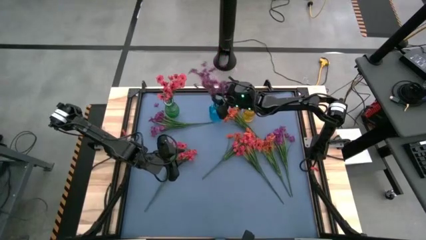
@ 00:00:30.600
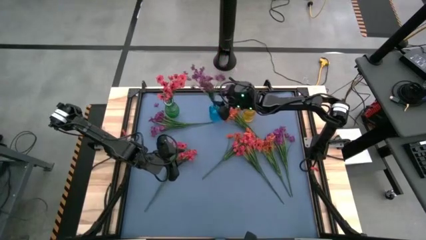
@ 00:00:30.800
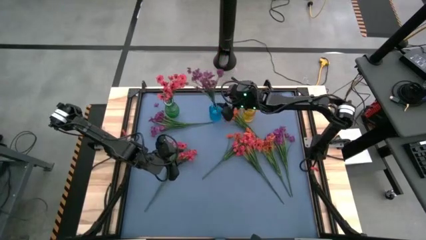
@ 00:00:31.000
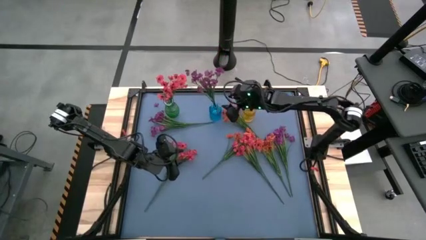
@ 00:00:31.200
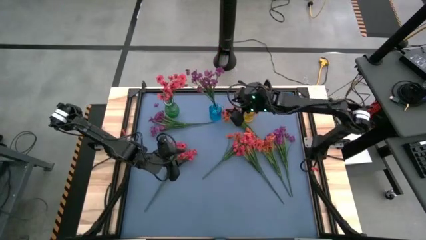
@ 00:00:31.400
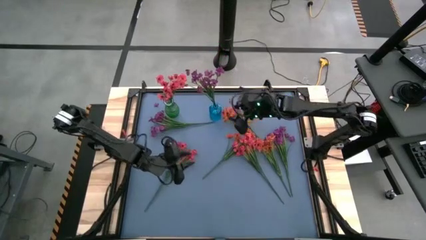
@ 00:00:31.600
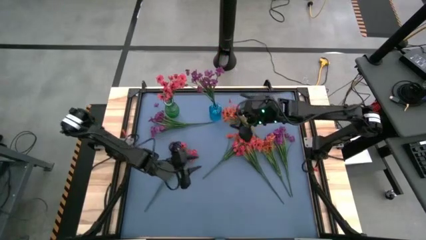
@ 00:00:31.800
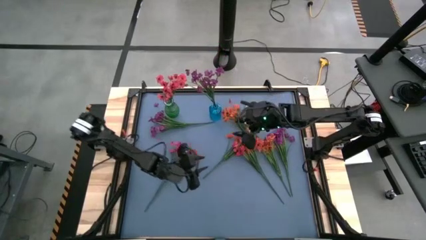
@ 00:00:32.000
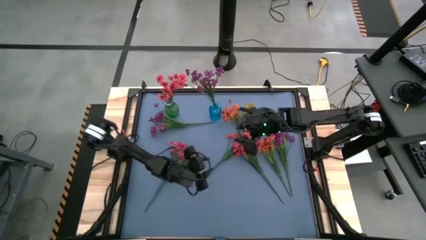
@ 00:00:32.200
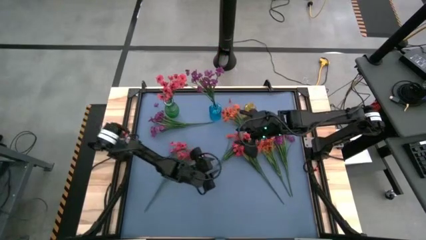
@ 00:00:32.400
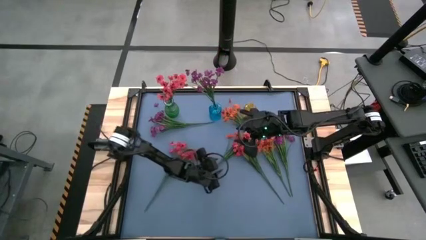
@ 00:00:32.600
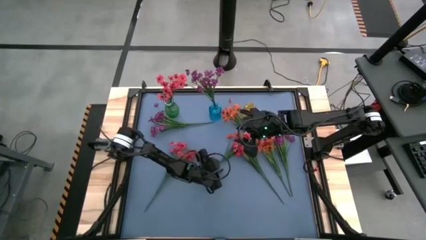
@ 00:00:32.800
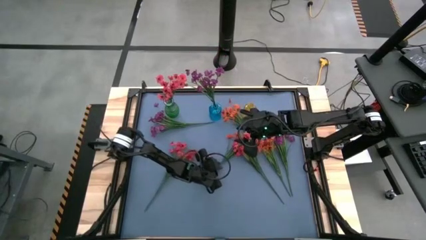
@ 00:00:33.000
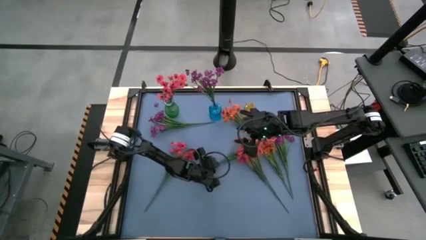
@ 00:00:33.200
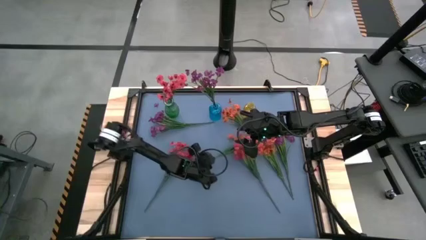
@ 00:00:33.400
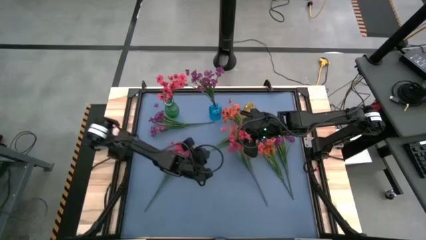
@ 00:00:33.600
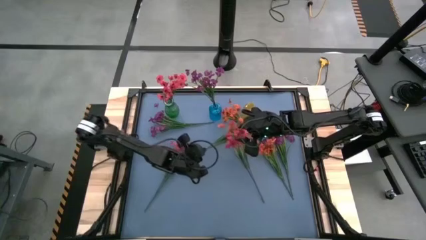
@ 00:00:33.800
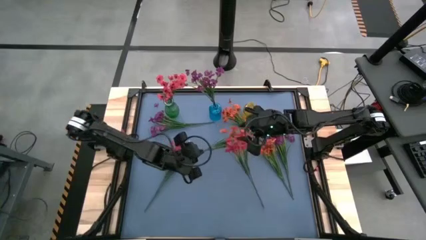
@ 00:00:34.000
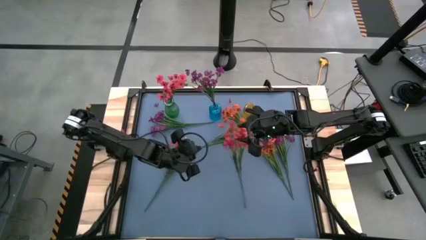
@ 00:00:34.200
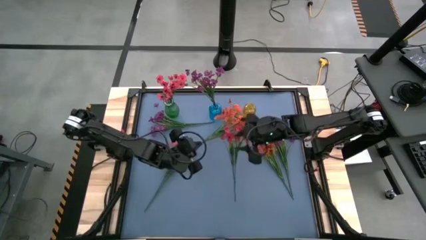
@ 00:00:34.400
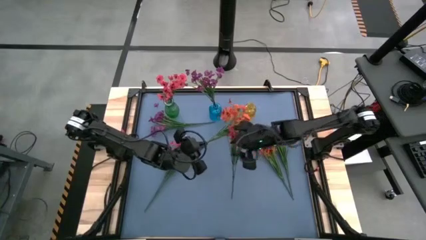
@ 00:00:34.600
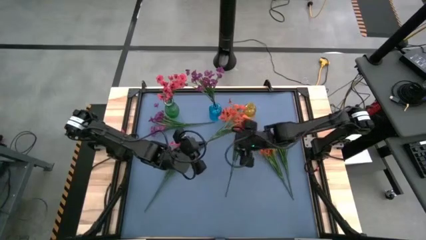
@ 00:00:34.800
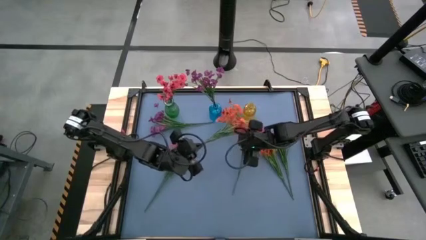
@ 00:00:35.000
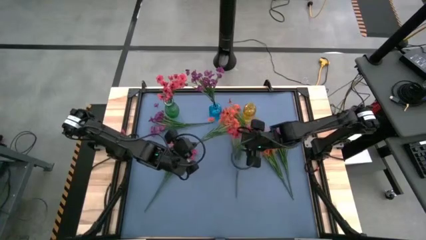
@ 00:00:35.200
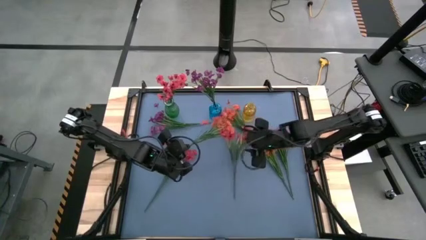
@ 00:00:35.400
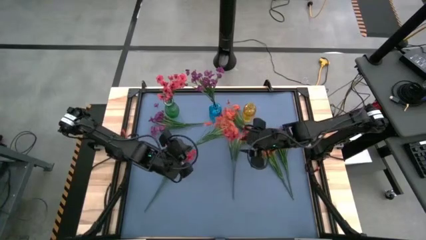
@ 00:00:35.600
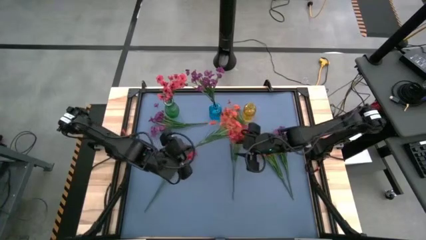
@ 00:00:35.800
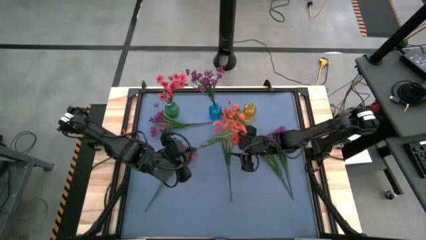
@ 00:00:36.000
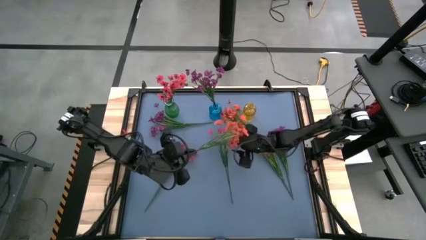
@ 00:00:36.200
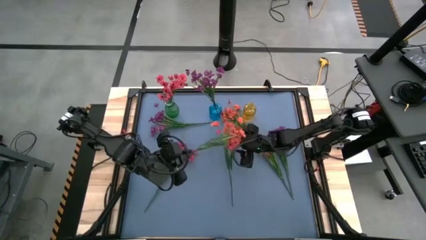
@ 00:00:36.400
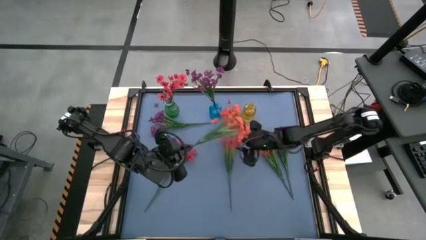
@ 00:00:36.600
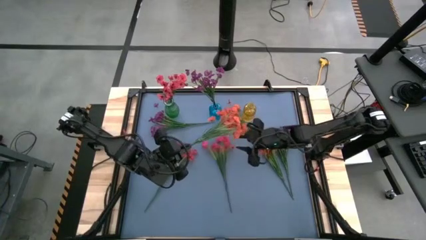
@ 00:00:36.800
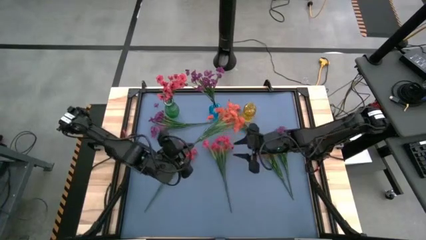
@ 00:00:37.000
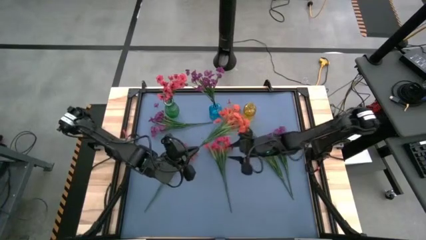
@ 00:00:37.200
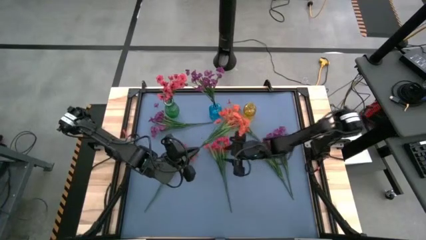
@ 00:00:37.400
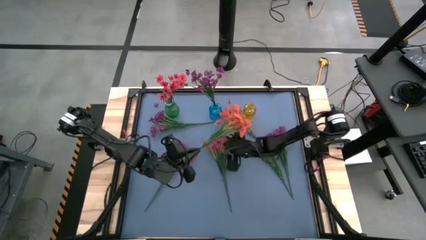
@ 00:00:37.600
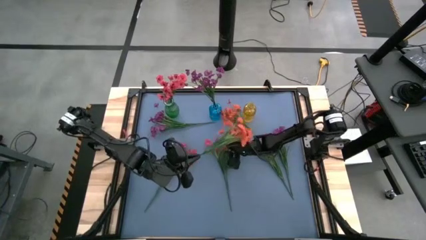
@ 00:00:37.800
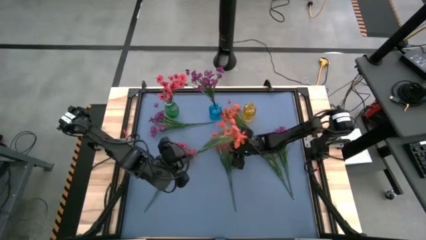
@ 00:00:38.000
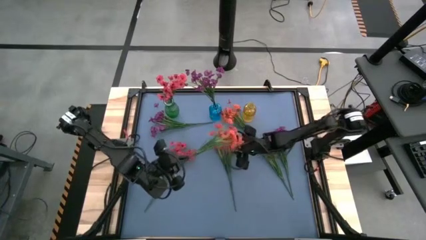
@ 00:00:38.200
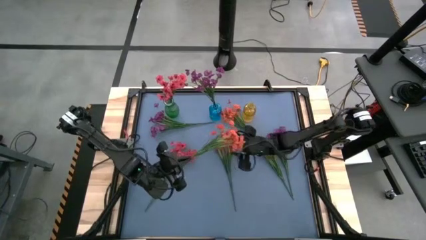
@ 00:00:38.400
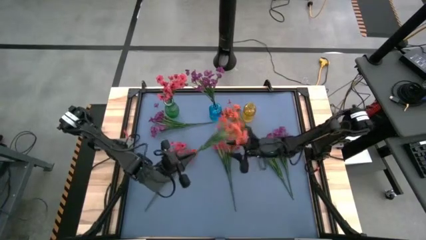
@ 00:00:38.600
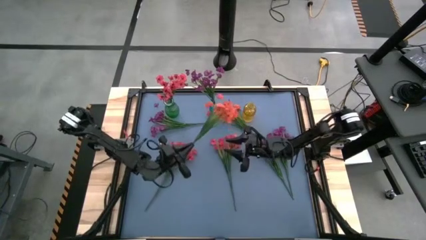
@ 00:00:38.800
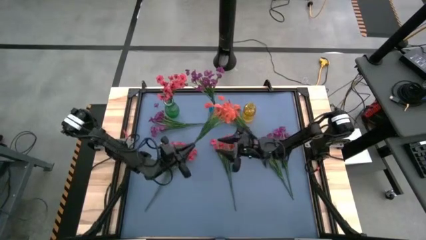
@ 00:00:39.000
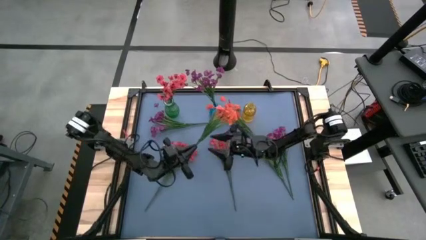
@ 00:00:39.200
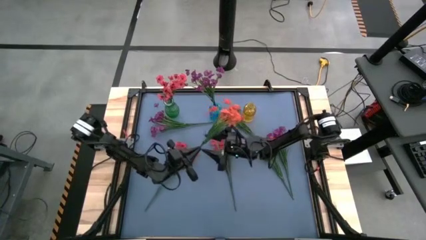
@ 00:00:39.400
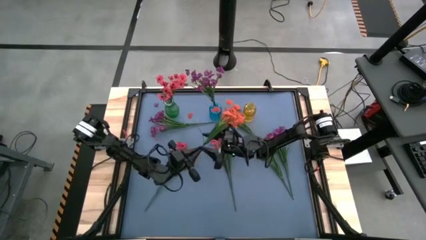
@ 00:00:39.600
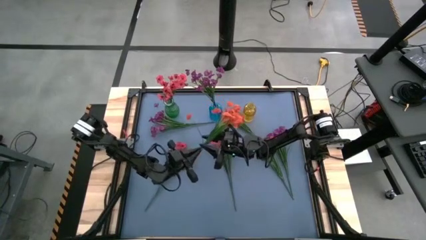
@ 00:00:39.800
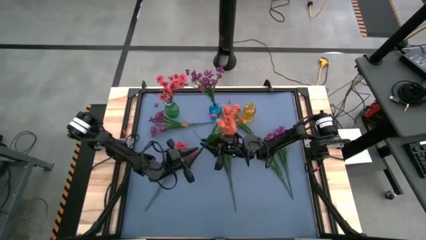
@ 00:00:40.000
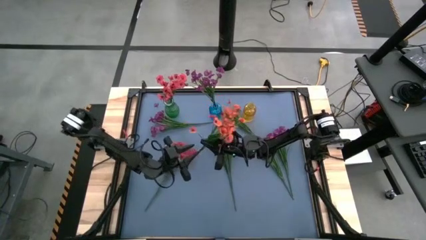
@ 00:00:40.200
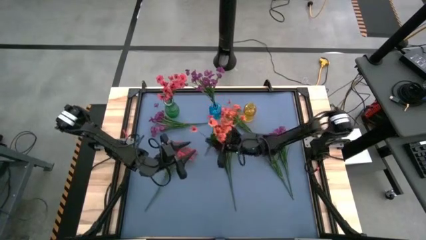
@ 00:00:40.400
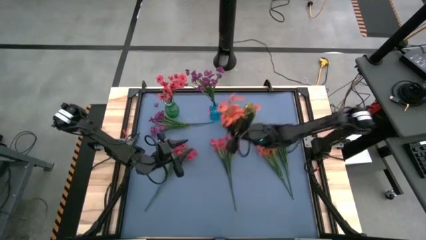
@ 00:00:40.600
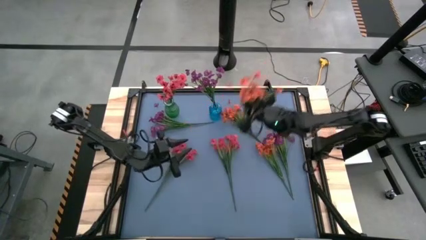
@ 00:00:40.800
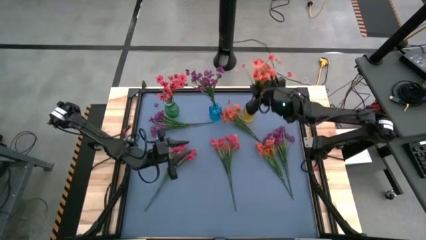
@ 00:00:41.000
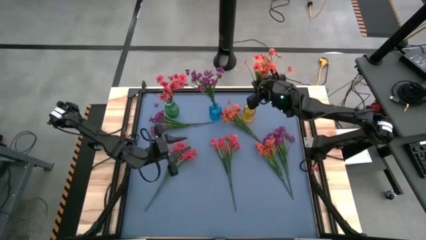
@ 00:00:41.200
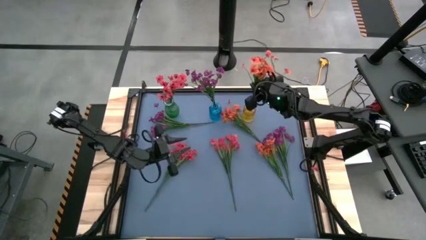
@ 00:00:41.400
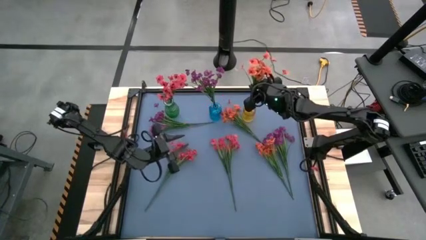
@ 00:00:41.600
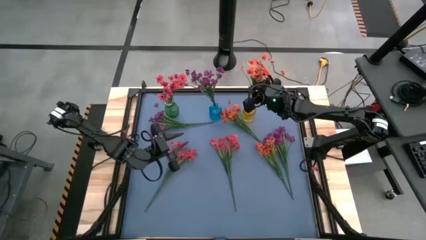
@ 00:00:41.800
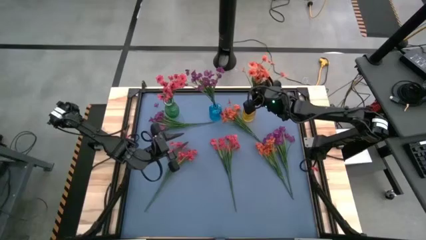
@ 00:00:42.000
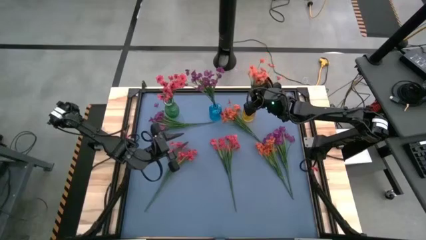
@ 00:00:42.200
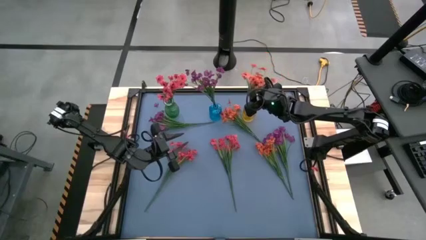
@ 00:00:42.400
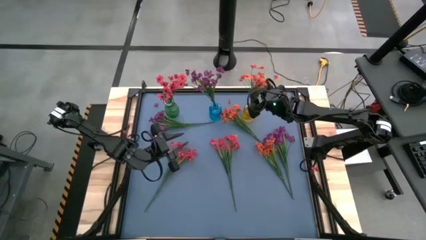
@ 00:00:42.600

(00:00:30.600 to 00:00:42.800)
Task: Sort flowers into vase by color
Put the bottom left orange flower into the yellow vase

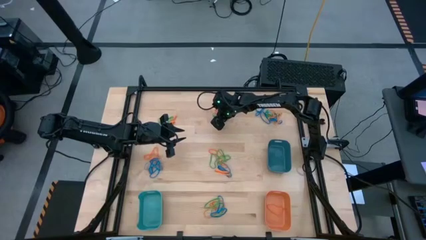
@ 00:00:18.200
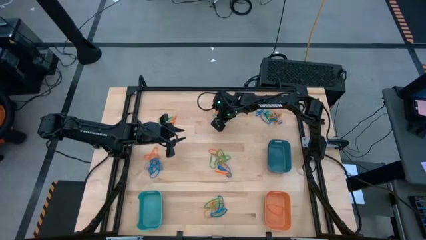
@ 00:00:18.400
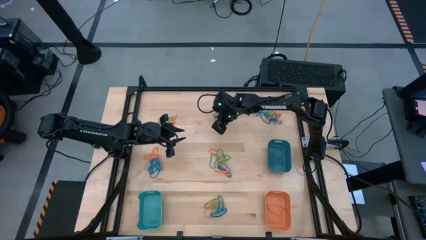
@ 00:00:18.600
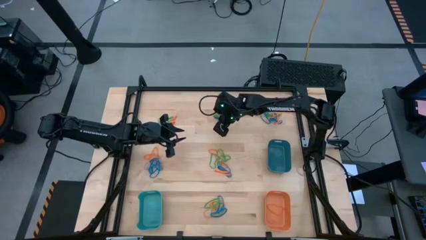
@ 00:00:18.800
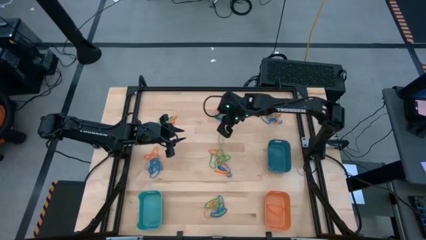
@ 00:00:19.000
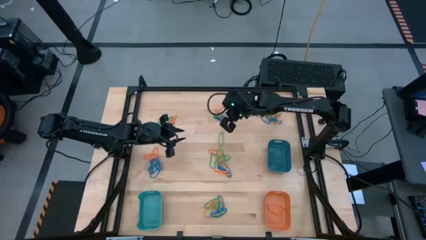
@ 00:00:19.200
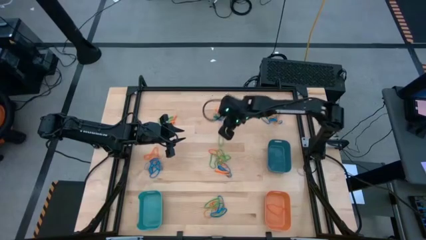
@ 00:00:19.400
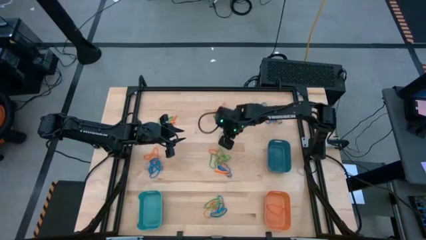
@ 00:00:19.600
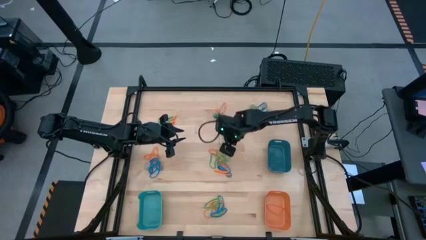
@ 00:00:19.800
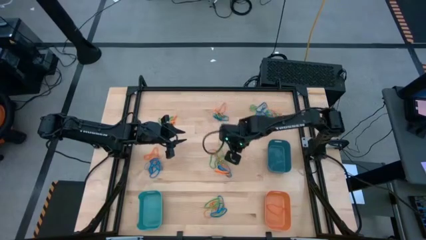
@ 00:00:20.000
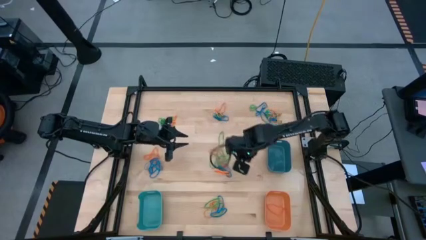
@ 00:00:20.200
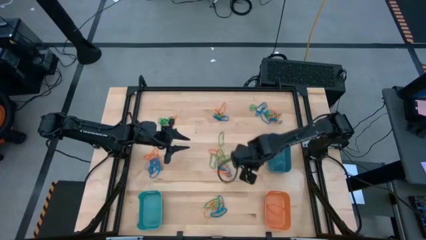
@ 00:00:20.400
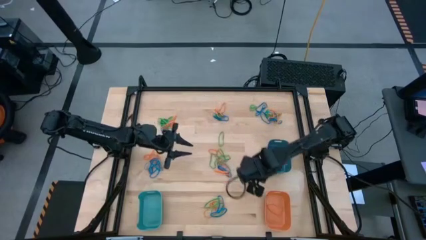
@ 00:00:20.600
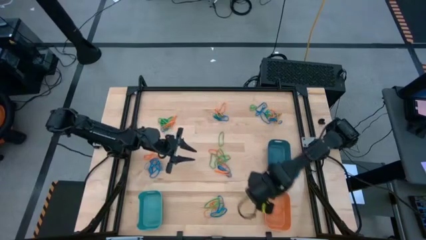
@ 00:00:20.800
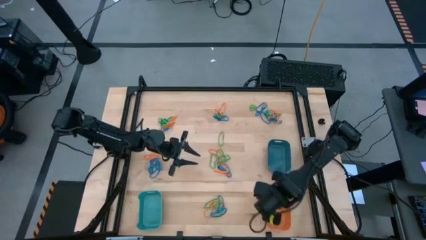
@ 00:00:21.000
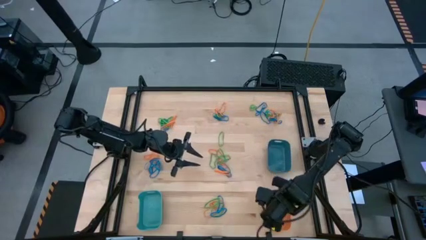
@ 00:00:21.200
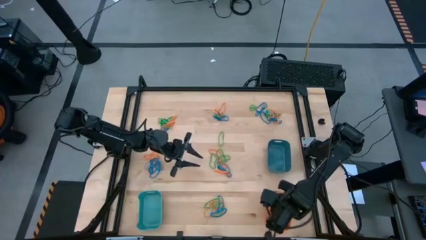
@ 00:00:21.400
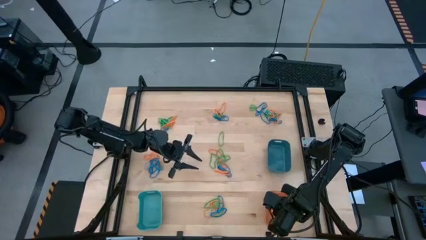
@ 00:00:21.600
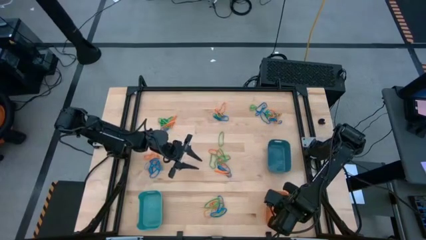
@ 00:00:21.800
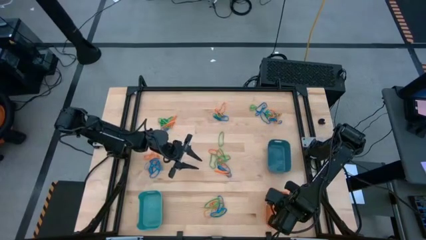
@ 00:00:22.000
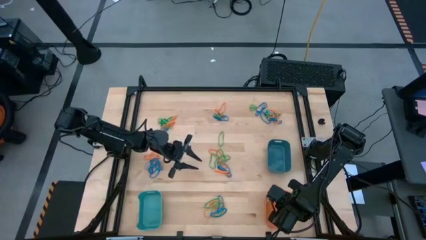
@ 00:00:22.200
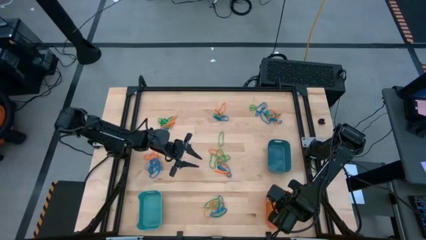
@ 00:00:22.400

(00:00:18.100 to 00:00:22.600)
Task: Sort rubber bands into baskets
Put the orange rubber band into the orange bin
